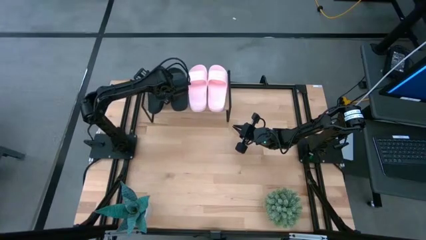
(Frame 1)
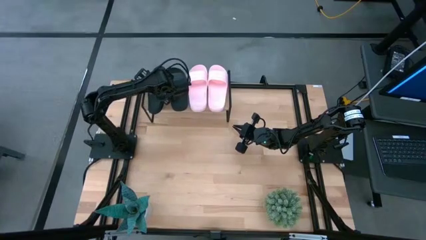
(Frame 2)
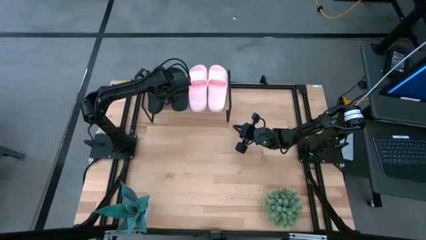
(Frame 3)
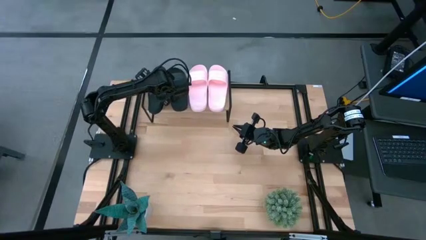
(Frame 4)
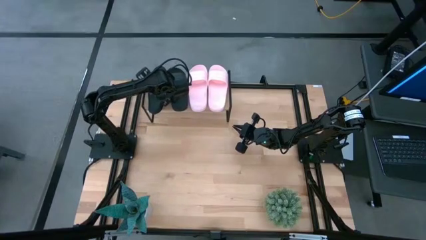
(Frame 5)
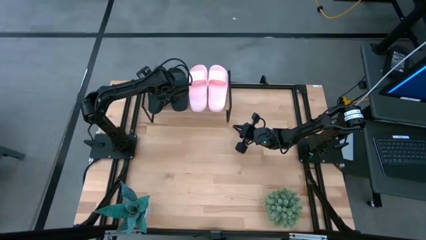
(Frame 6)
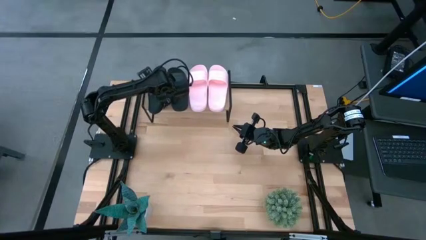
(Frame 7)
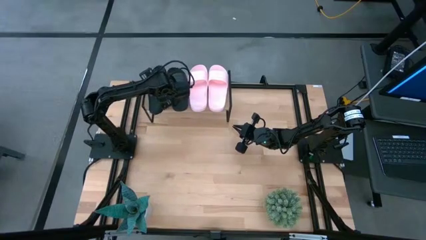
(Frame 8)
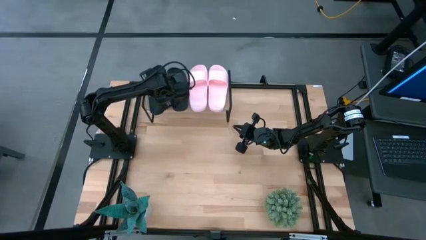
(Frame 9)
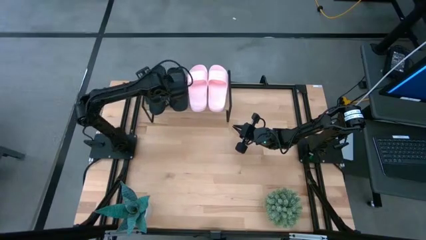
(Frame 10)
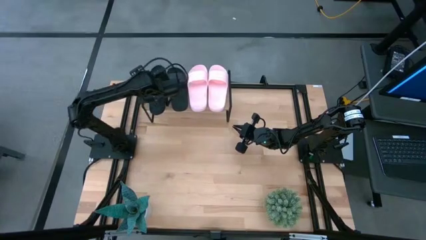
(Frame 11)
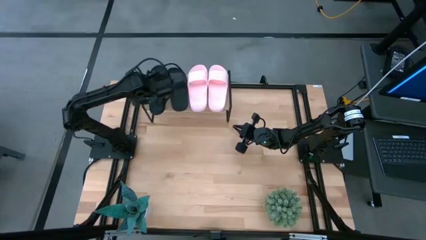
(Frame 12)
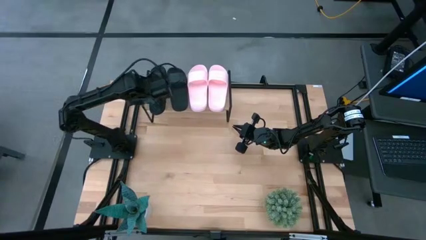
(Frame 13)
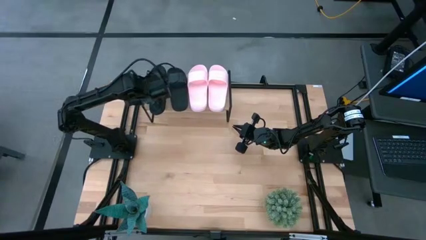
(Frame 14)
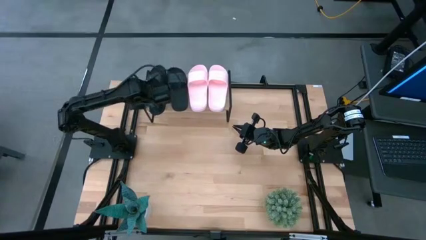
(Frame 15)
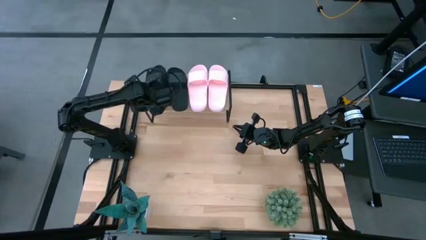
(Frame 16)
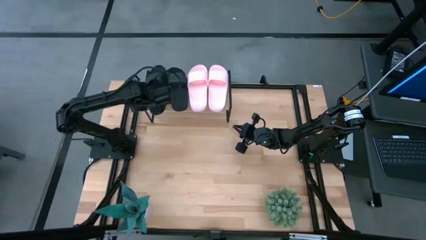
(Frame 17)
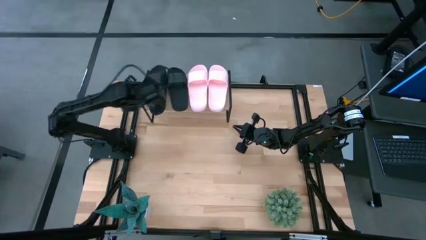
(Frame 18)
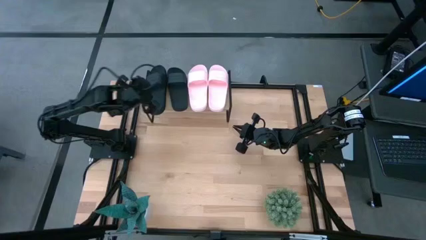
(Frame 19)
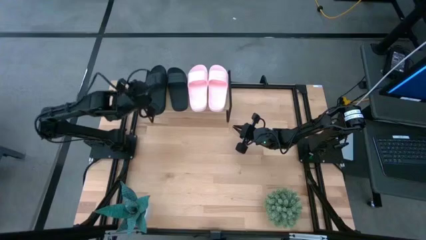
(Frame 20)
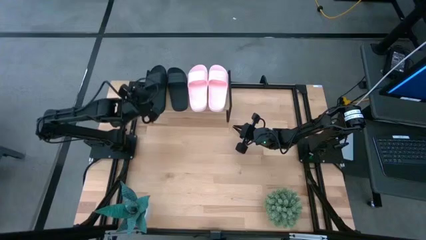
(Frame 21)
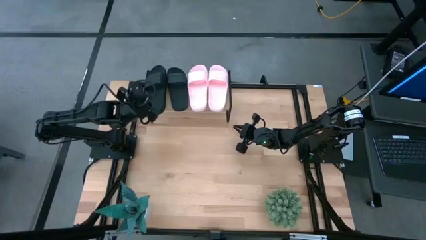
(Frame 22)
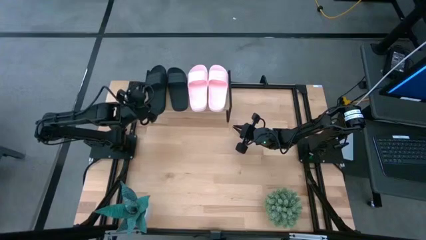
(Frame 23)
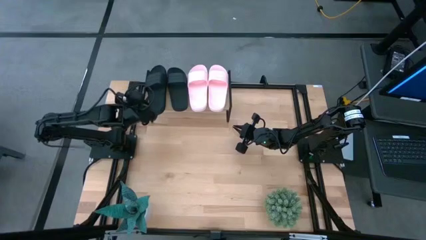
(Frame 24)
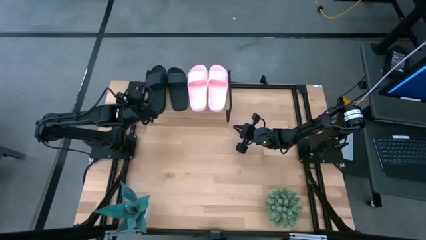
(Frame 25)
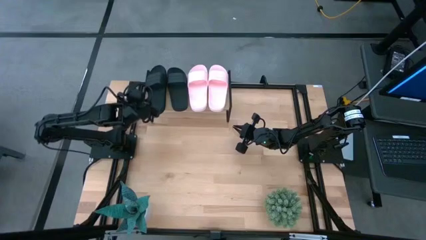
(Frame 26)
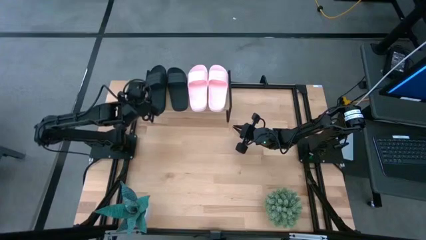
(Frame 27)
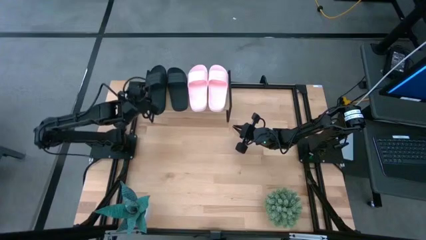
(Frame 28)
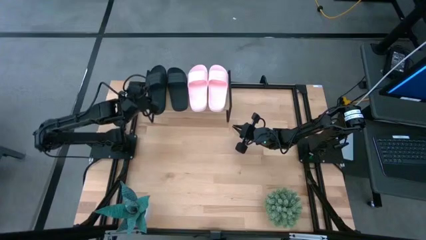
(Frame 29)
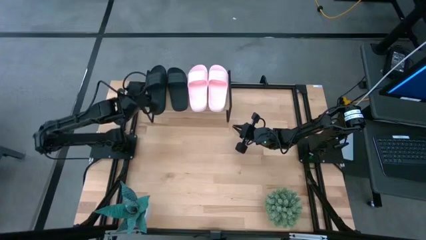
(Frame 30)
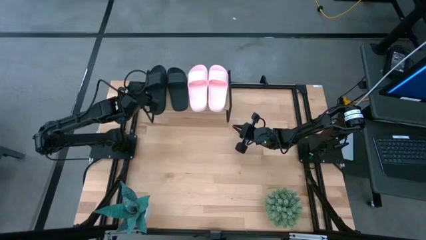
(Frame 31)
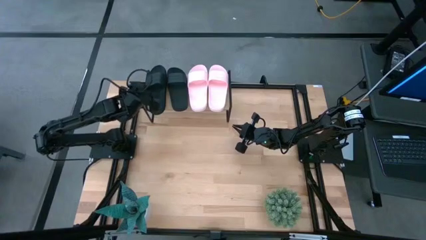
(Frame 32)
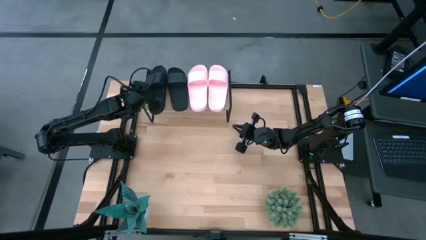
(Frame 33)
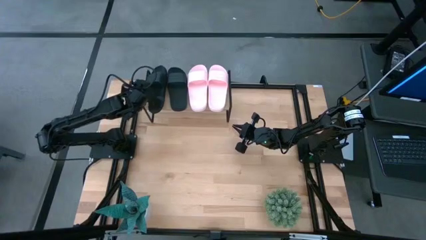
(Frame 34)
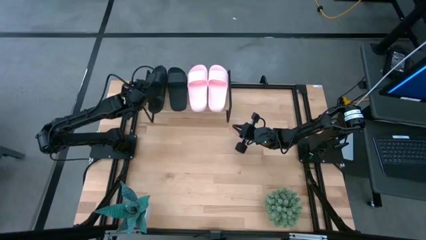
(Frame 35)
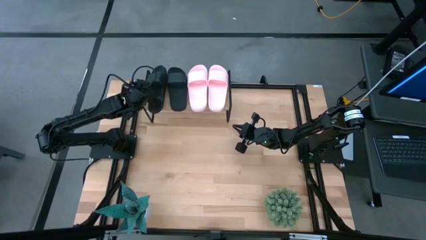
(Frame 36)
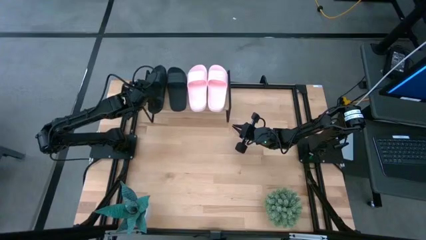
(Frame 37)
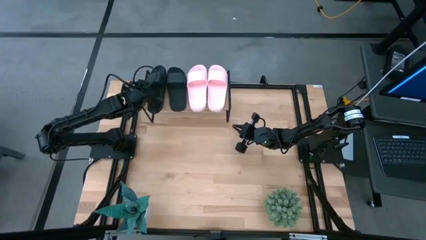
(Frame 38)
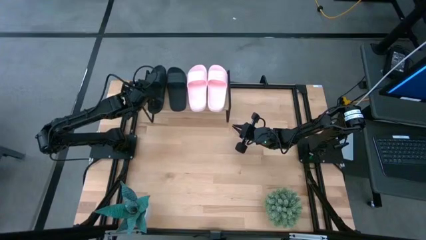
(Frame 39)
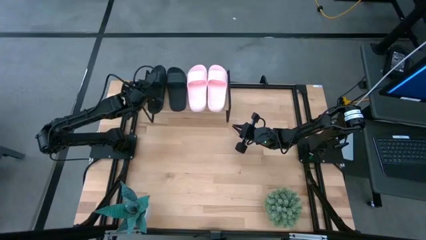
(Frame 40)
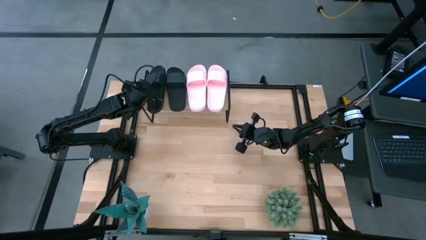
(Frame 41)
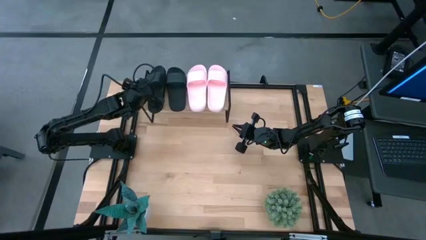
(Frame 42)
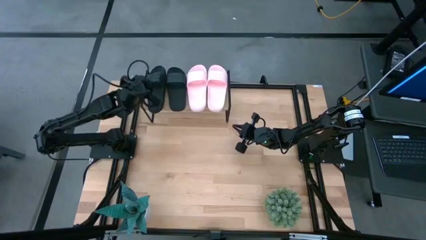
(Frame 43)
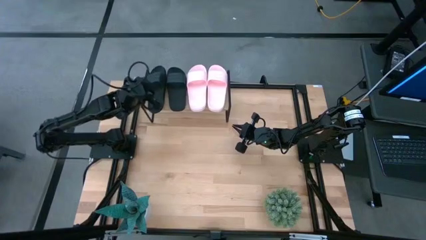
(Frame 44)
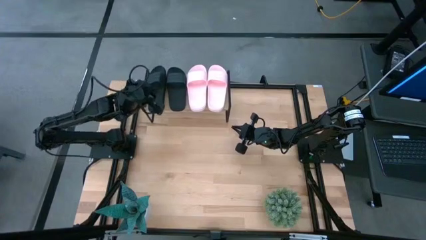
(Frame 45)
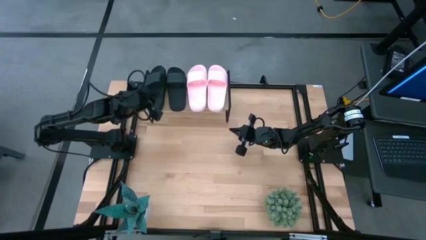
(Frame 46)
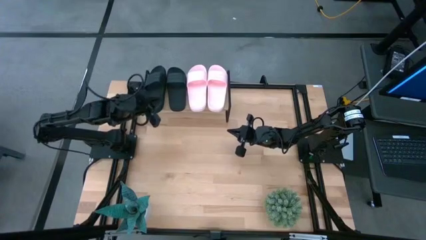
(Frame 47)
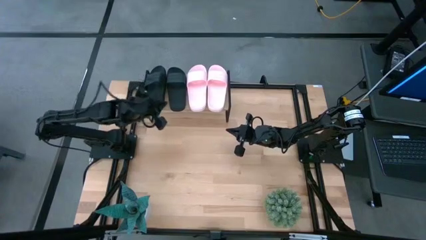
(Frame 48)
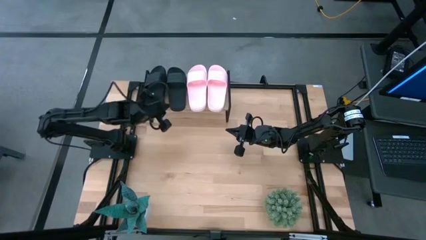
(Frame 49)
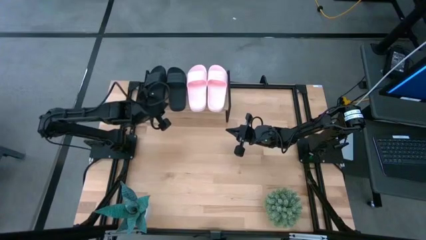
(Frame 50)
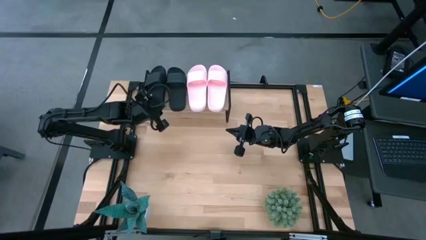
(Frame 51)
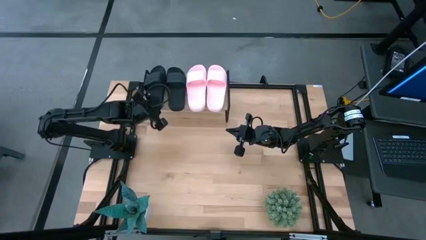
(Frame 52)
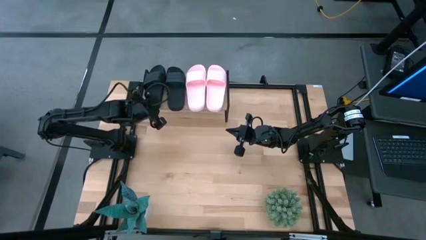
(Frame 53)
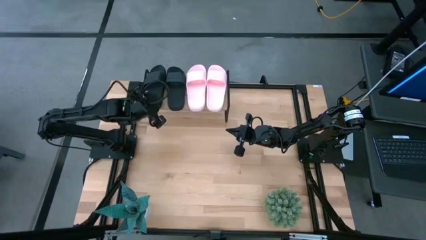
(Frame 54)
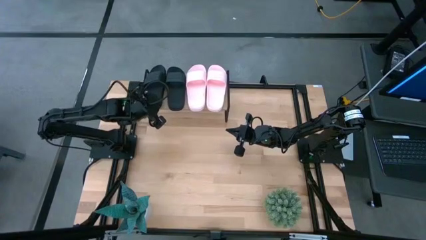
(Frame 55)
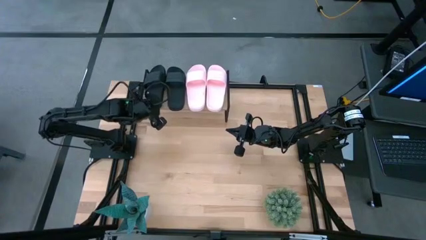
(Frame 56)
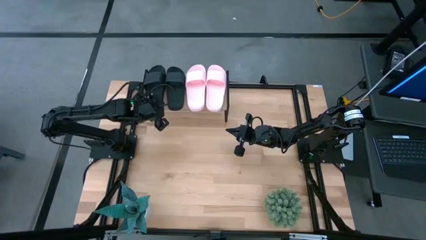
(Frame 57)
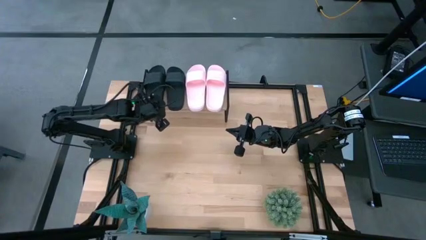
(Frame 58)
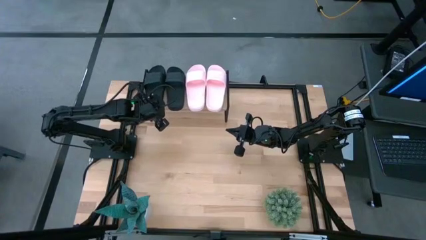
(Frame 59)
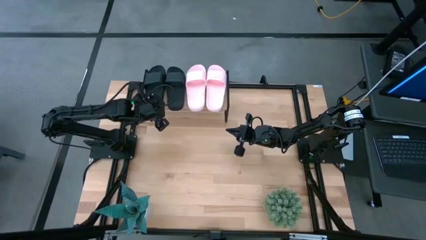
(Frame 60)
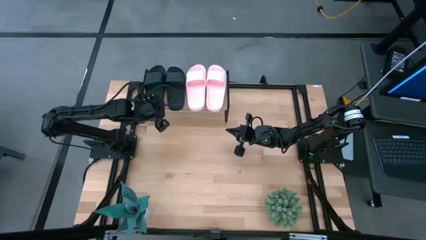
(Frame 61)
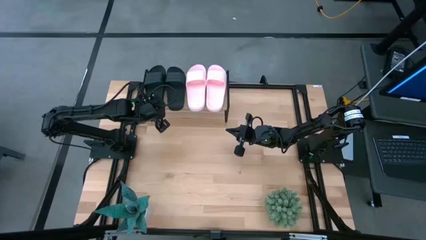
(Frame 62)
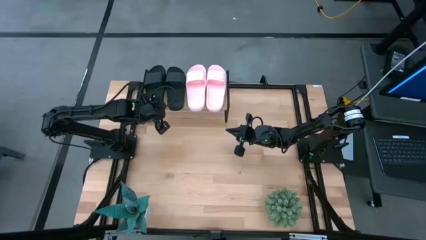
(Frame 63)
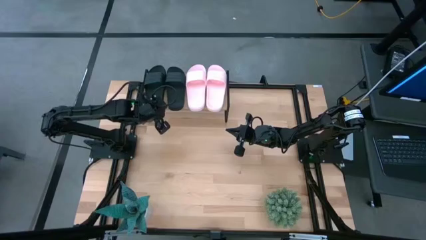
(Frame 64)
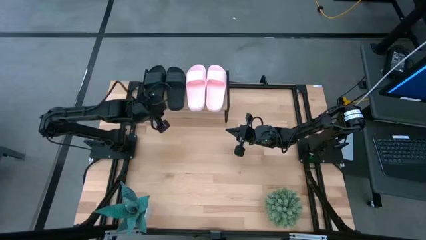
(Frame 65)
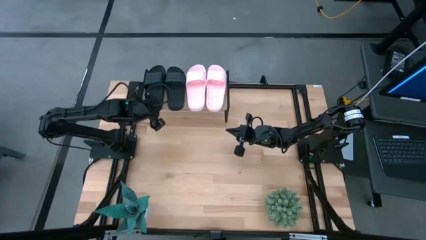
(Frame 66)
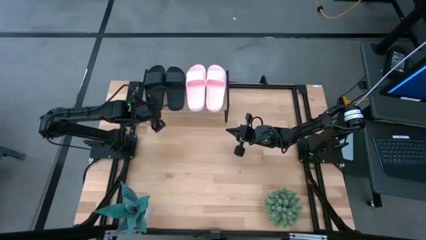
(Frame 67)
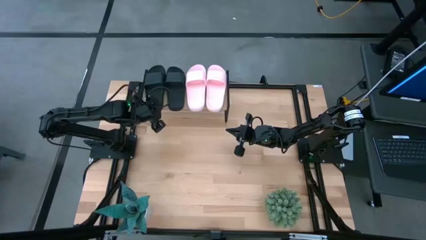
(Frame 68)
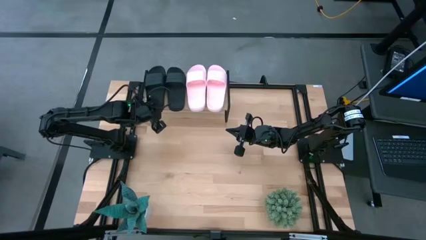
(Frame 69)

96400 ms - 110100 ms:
Task: Pick and place slides into the shelf
Put the black slide on the shelf
